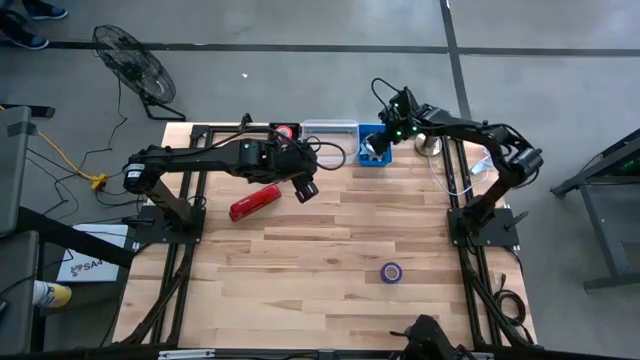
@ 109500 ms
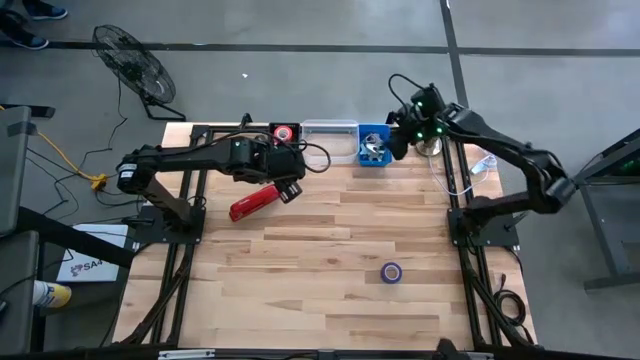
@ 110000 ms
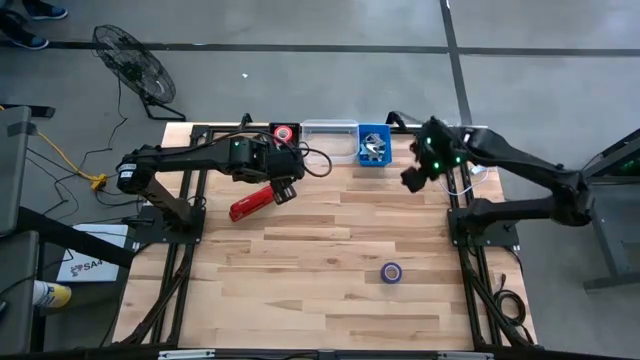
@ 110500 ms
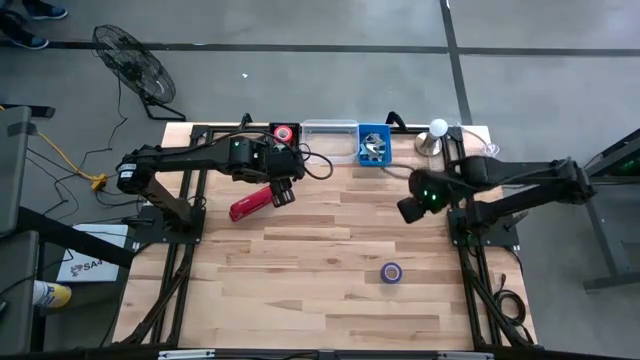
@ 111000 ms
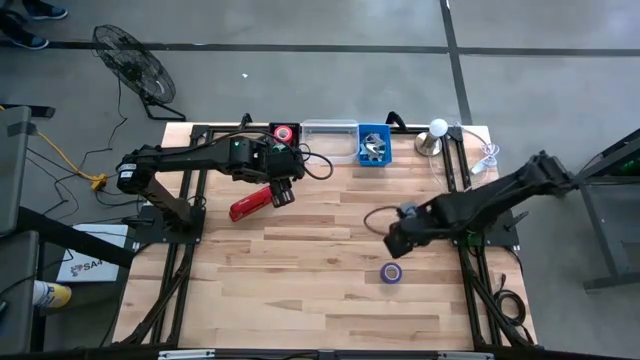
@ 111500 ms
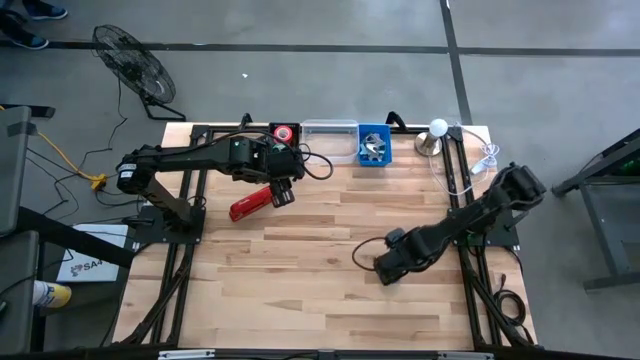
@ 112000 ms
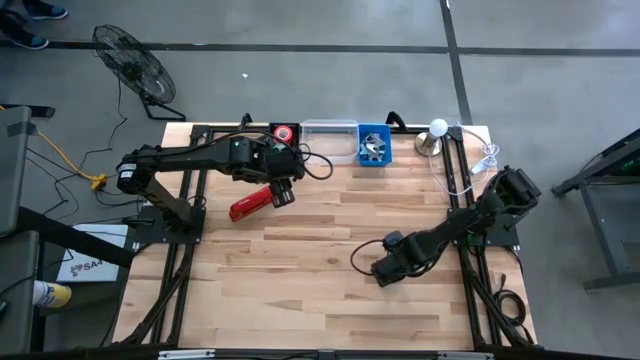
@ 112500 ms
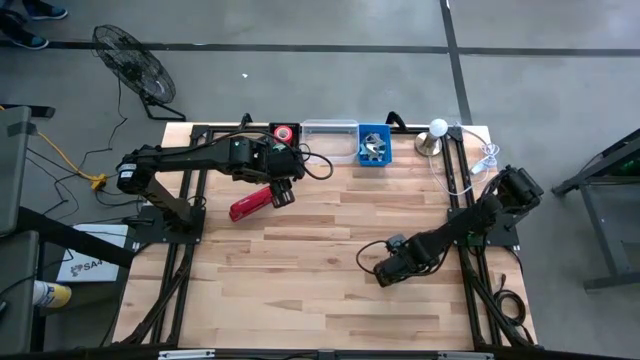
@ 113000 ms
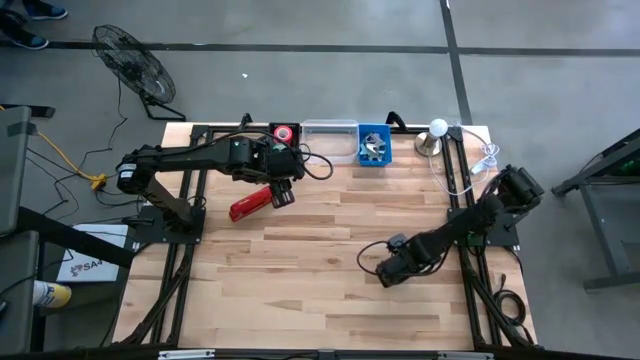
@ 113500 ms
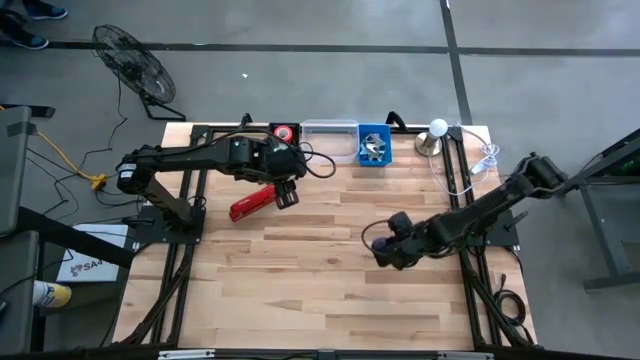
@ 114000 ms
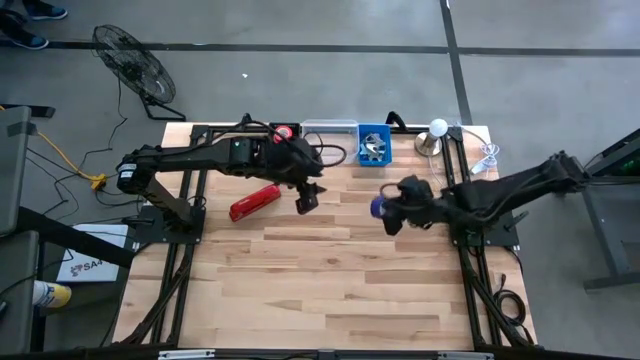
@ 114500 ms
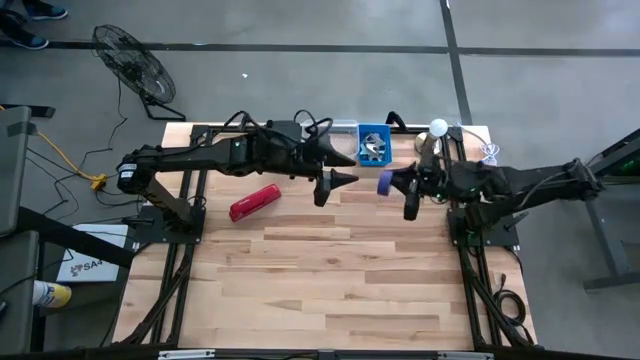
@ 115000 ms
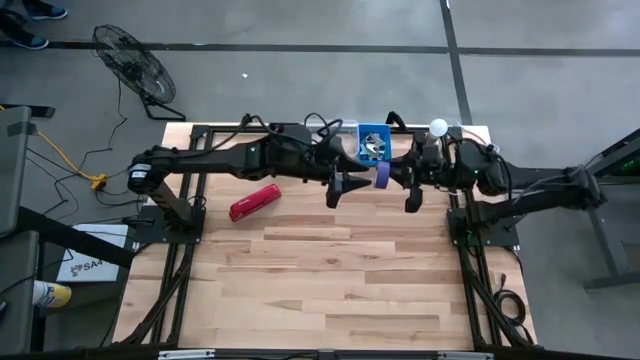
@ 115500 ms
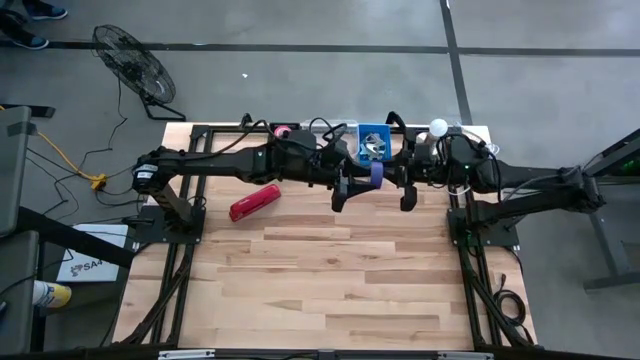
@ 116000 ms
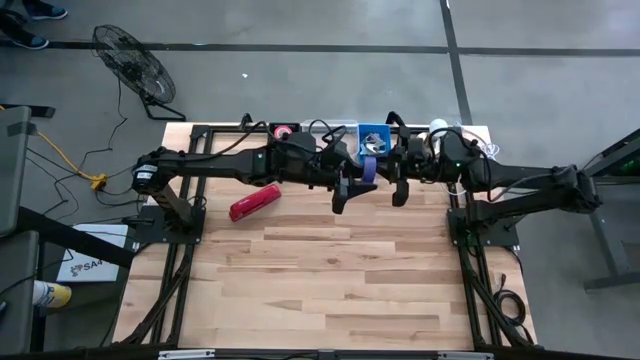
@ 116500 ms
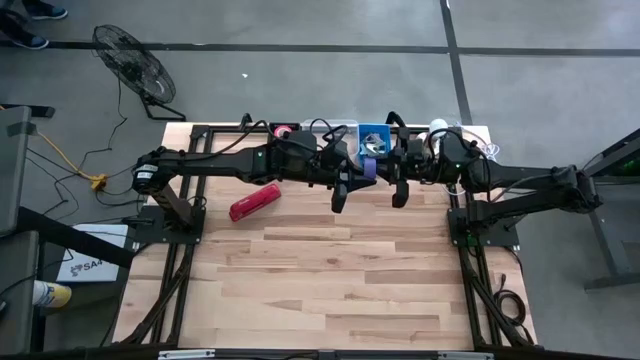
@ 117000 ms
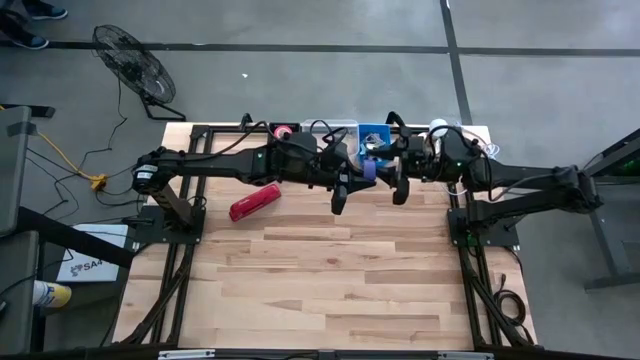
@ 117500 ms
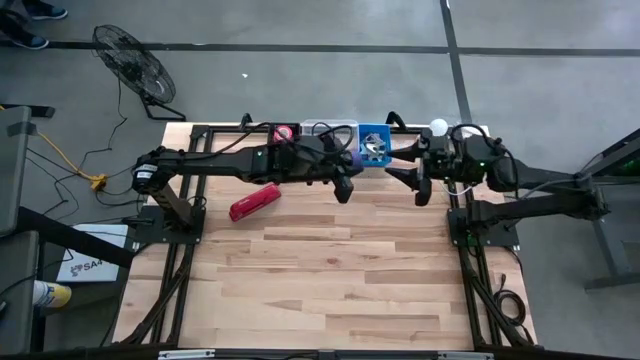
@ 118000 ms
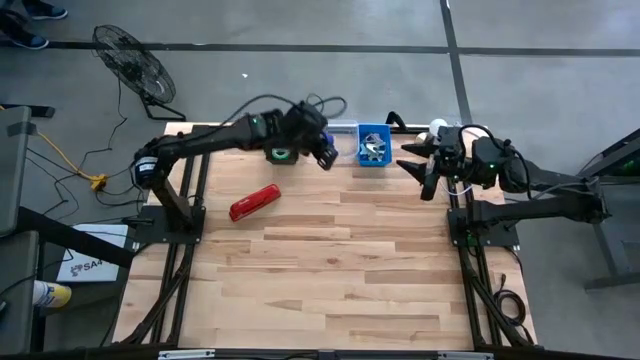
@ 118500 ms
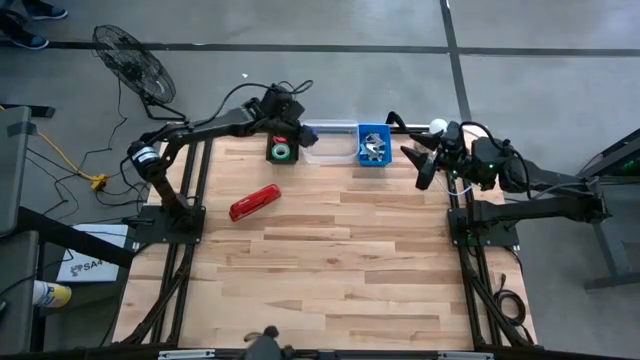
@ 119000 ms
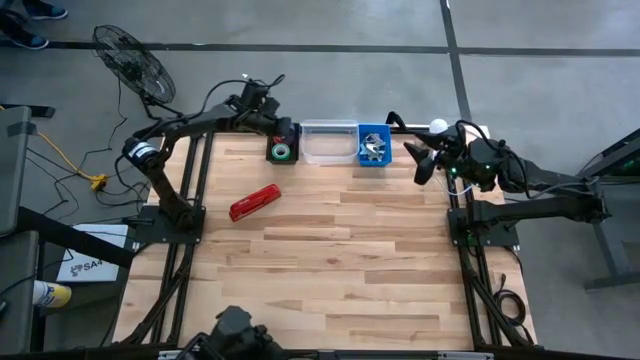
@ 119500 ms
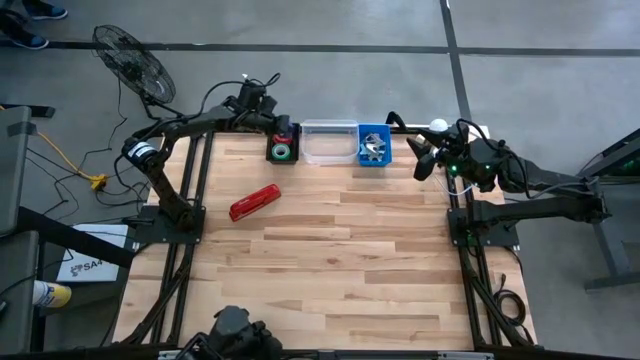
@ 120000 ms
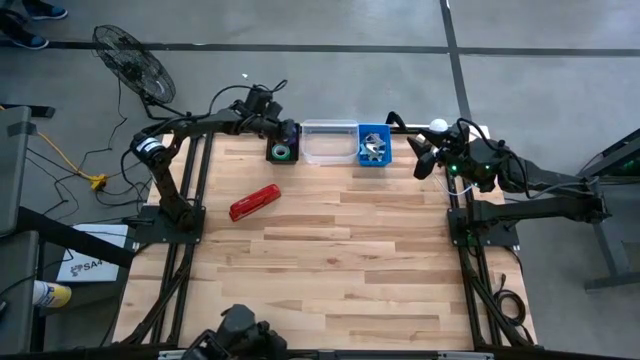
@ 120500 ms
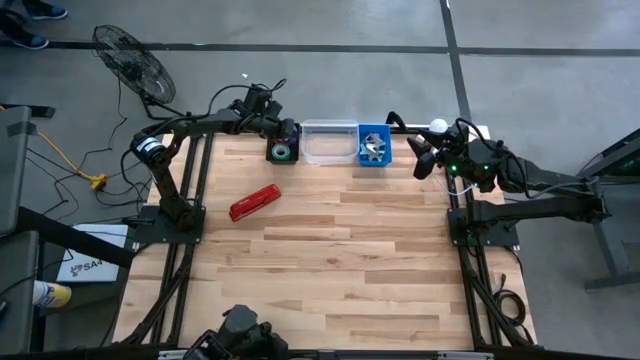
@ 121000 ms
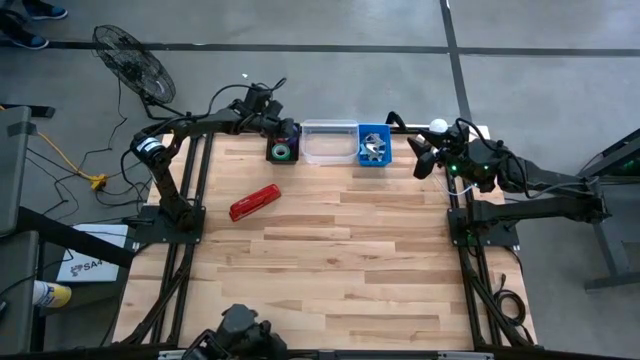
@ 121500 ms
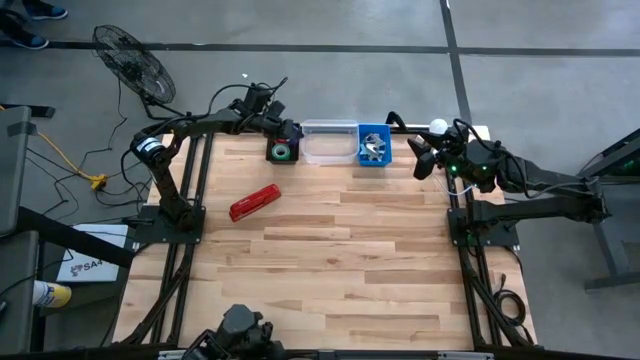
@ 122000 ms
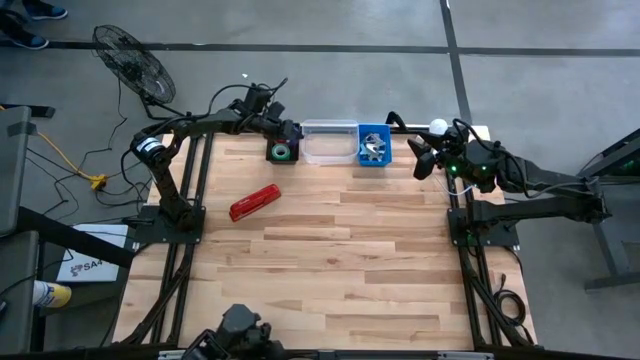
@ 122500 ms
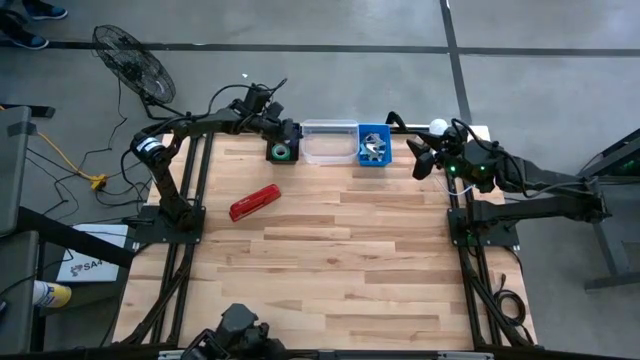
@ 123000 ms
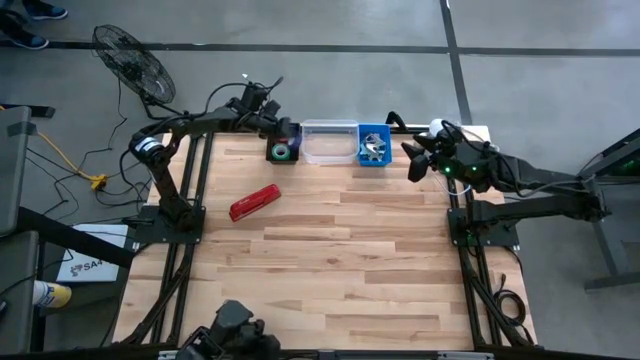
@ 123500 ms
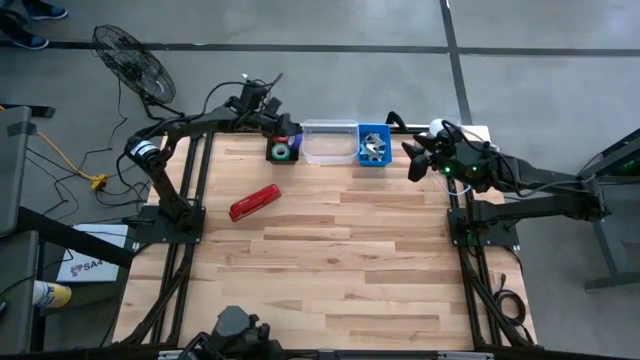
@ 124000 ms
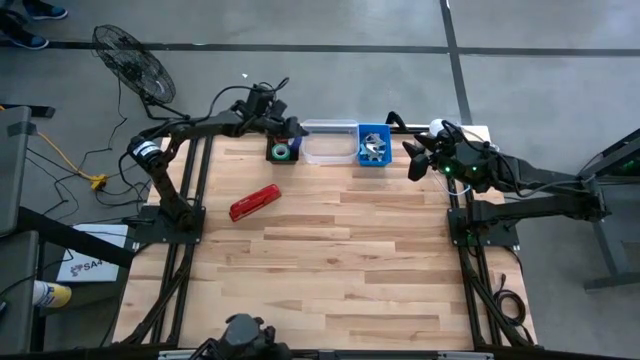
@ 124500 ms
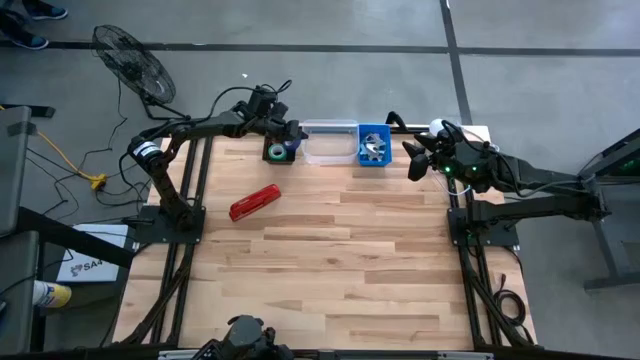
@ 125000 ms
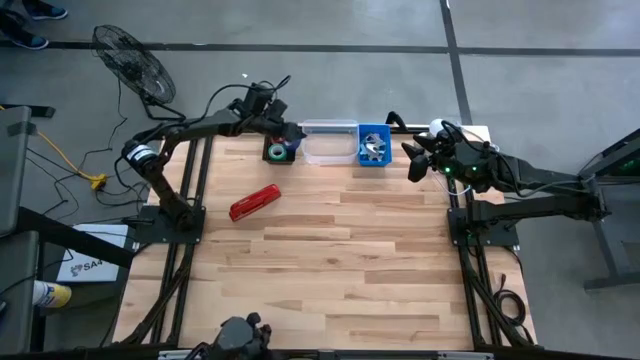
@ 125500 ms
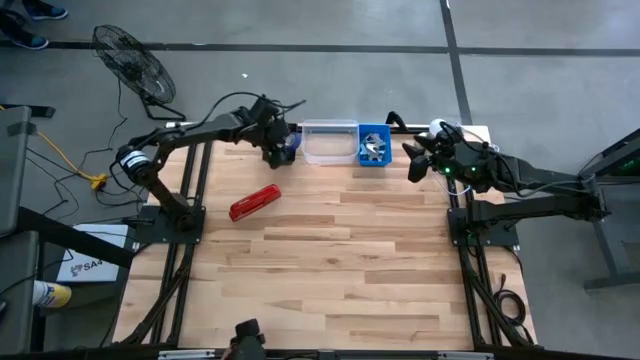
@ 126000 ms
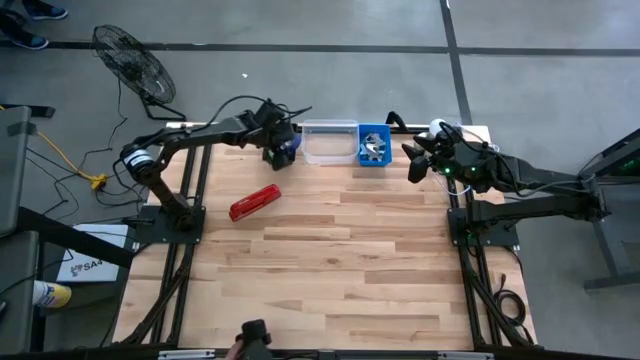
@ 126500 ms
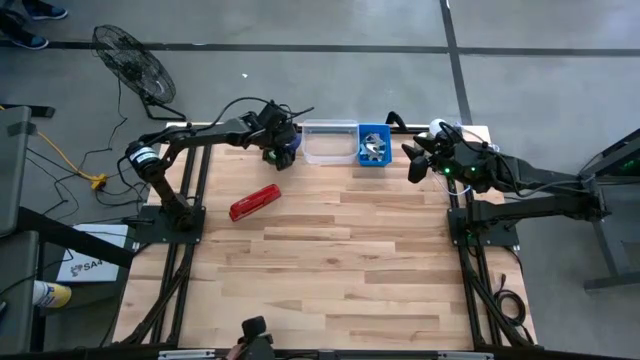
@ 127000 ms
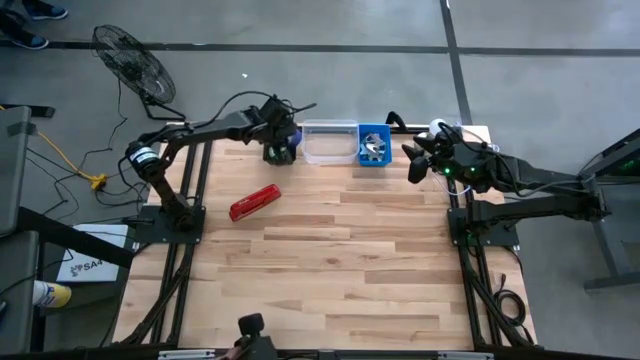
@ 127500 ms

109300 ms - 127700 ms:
Task: Pick and place Stapler, Stapler remover, tape
Put the blue tape into the black bin

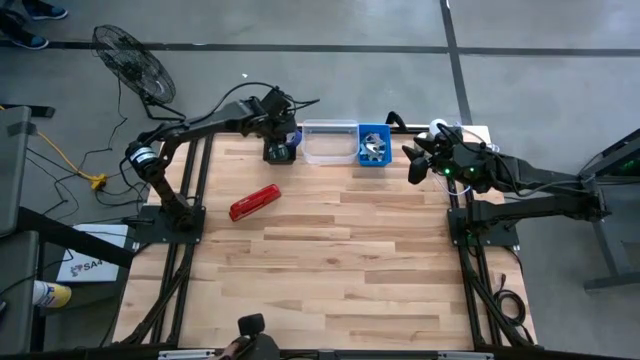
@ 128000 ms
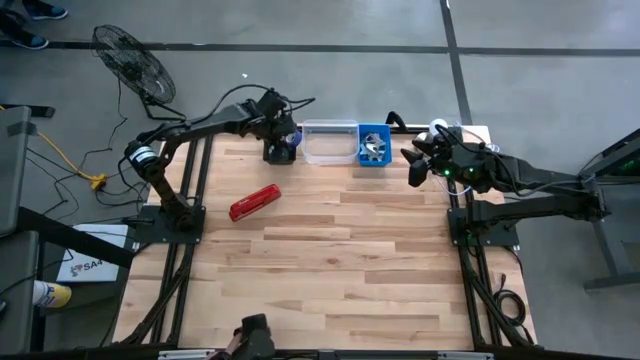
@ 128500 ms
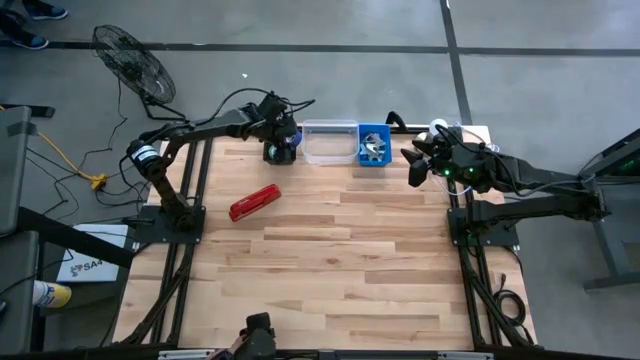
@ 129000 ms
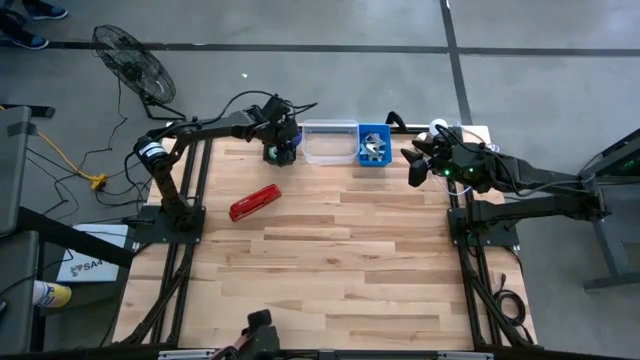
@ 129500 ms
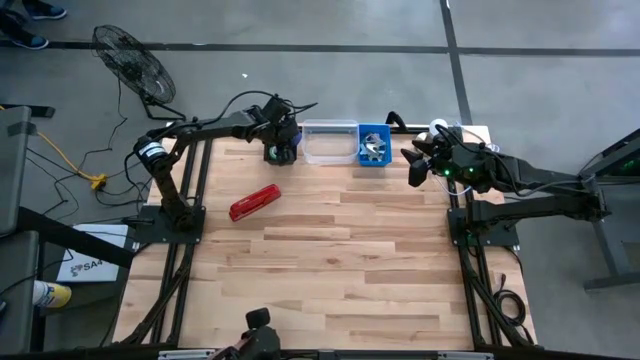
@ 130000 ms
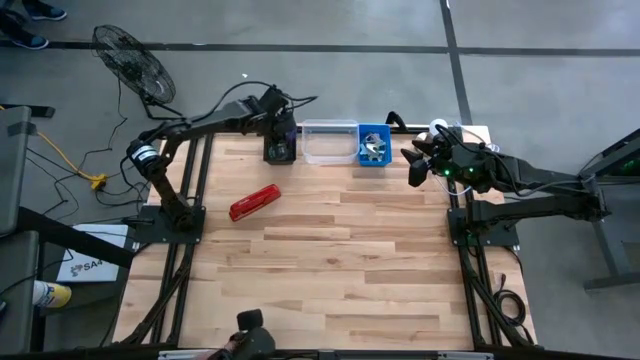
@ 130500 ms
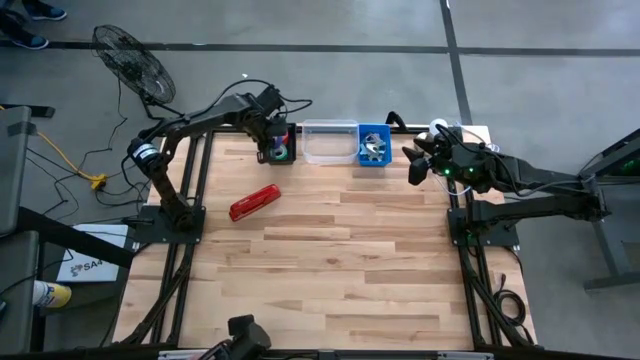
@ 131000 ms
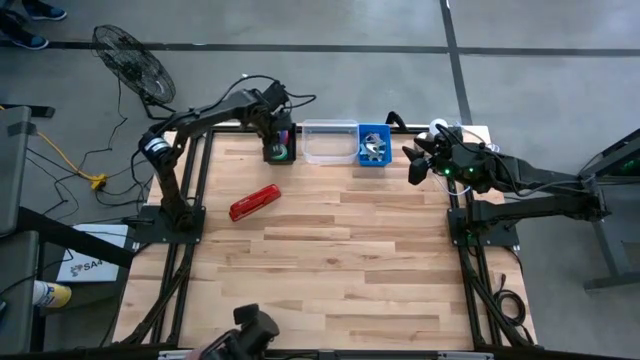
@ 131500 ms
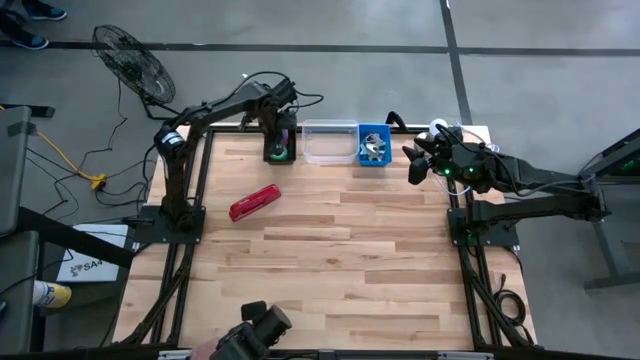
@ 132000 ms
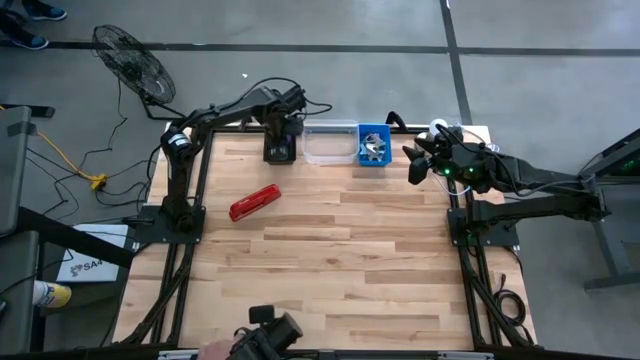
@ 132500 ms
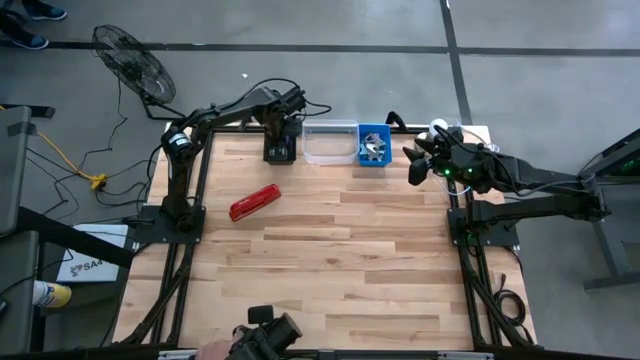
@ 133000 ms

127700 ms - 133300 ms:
Put the blue tape into the black bin
